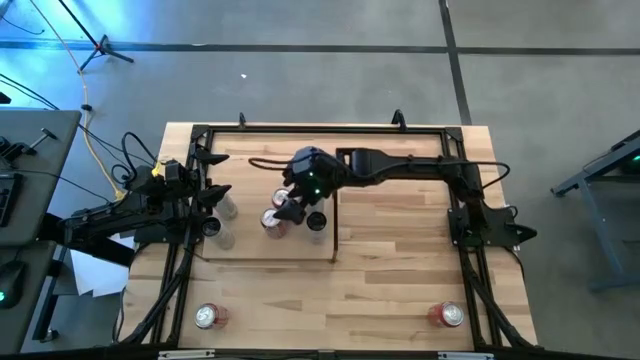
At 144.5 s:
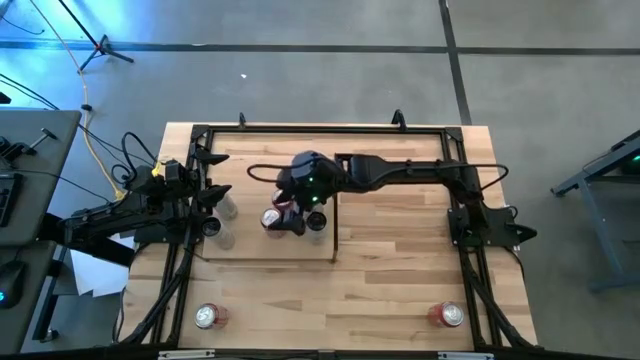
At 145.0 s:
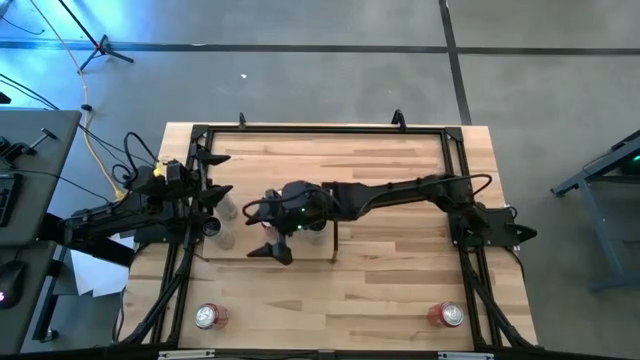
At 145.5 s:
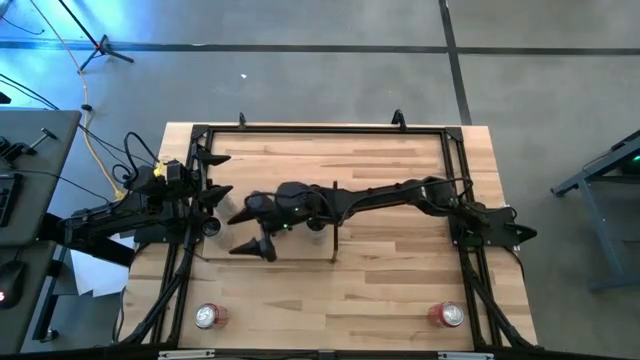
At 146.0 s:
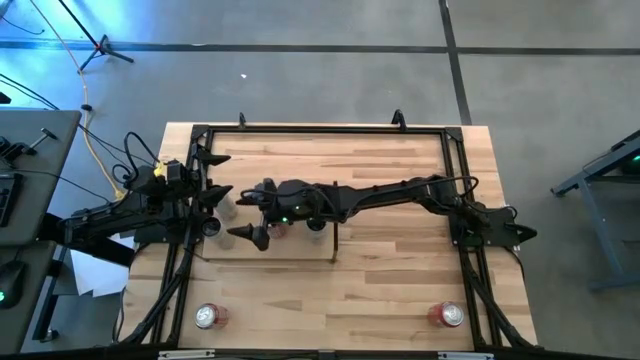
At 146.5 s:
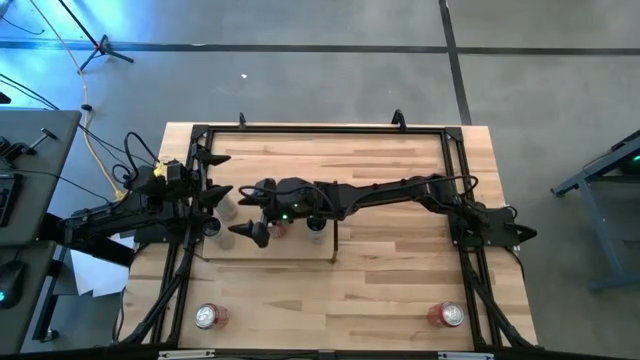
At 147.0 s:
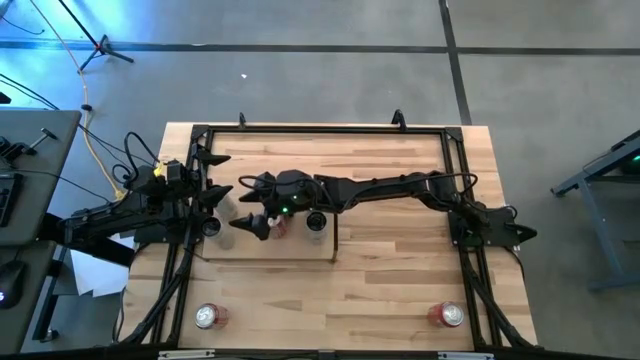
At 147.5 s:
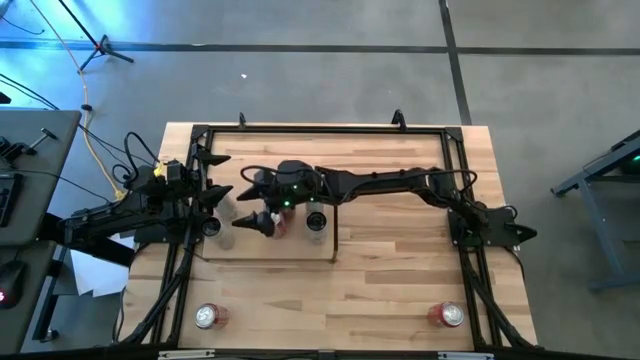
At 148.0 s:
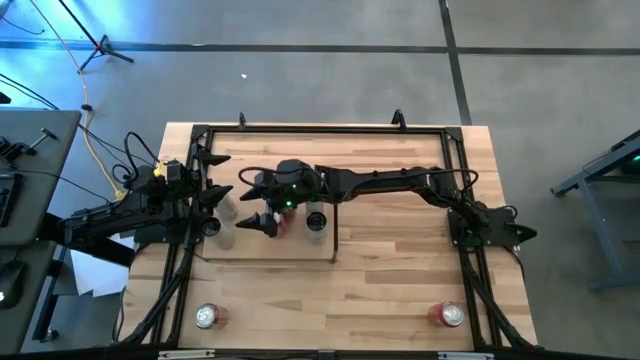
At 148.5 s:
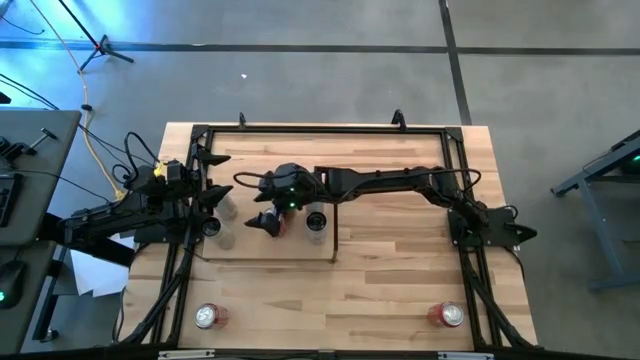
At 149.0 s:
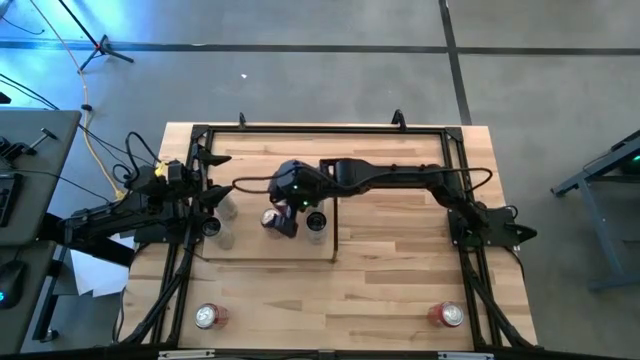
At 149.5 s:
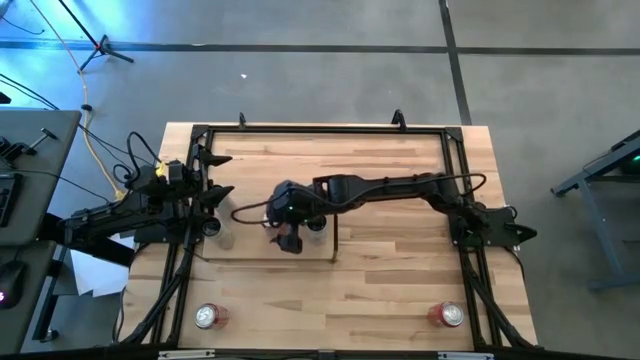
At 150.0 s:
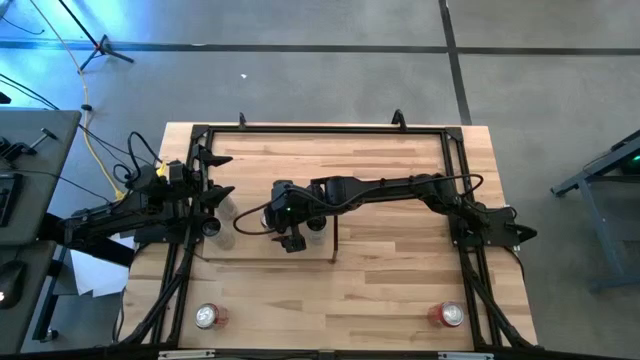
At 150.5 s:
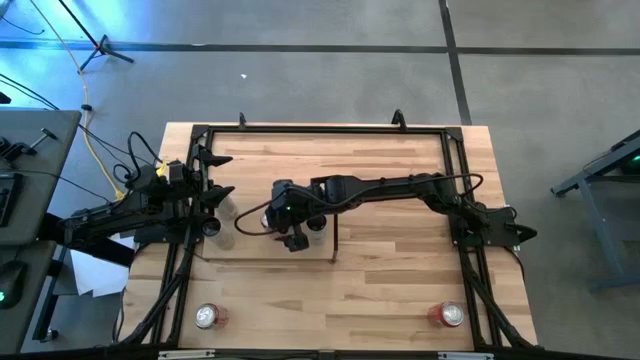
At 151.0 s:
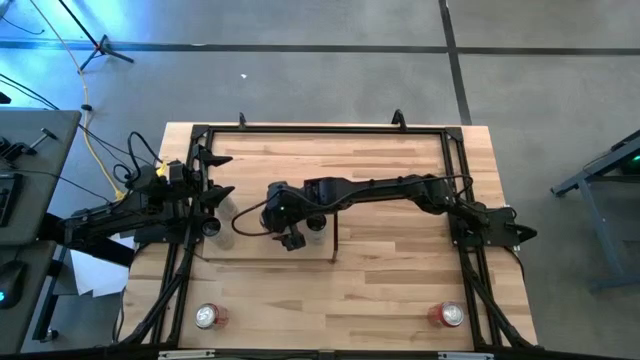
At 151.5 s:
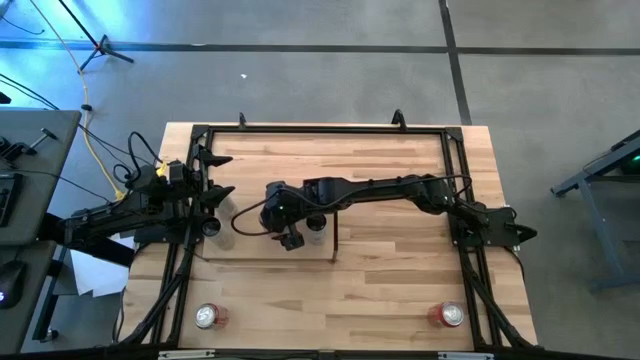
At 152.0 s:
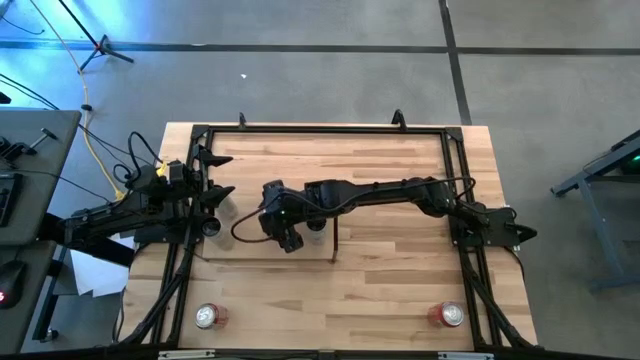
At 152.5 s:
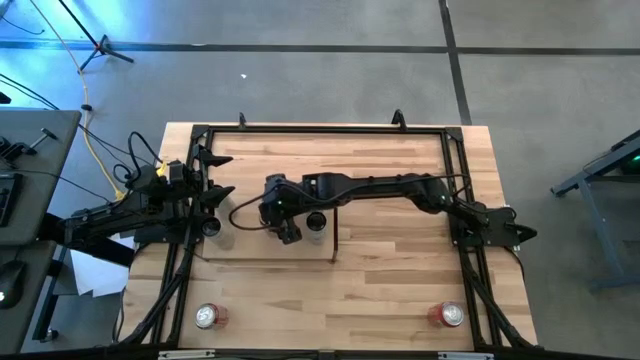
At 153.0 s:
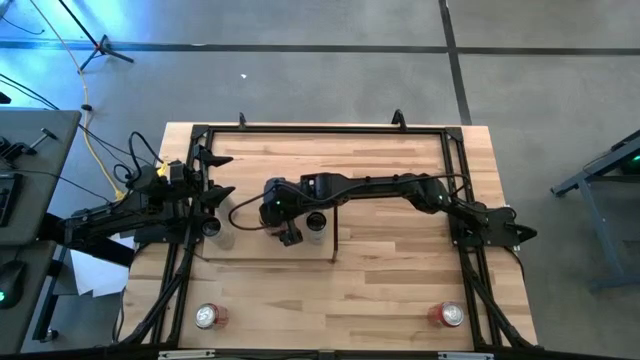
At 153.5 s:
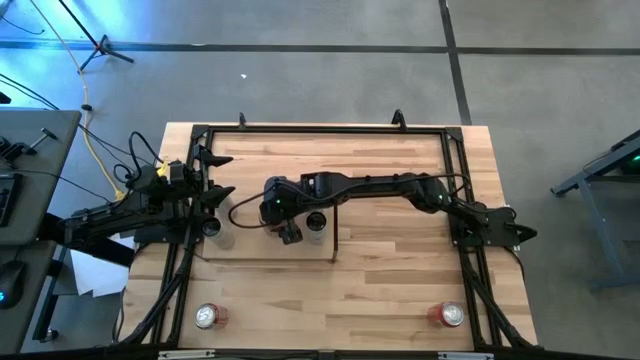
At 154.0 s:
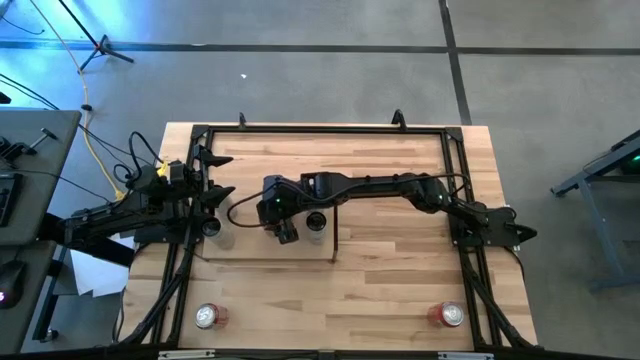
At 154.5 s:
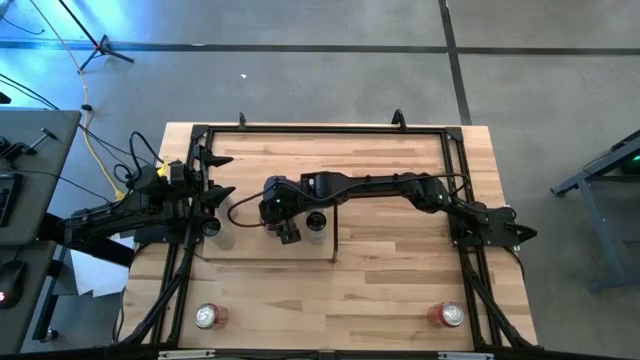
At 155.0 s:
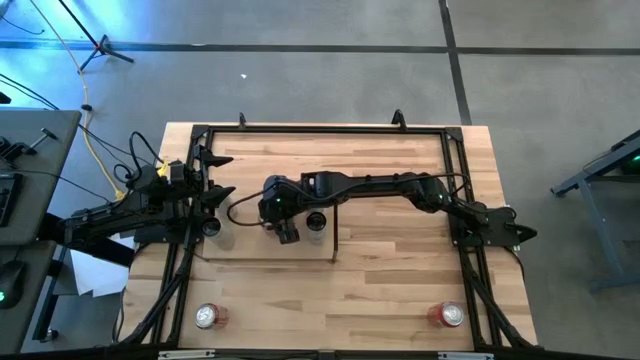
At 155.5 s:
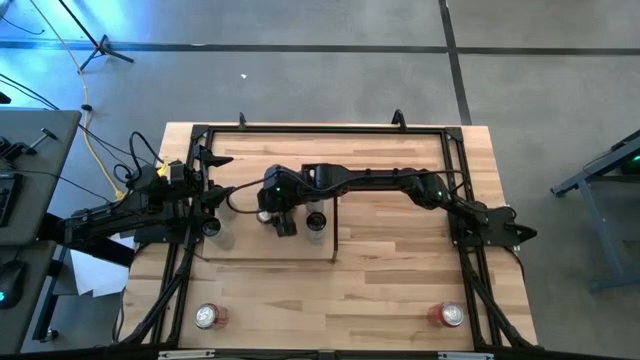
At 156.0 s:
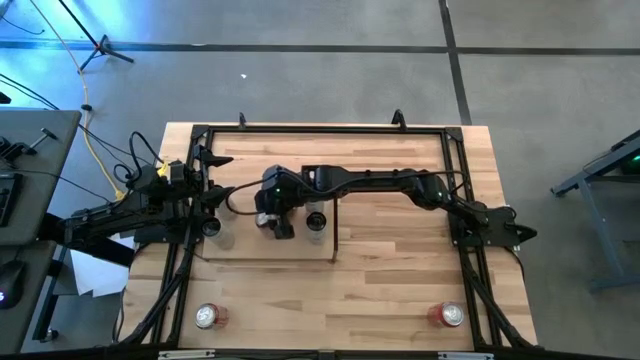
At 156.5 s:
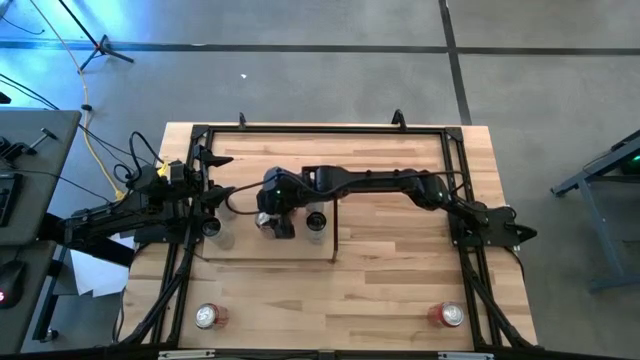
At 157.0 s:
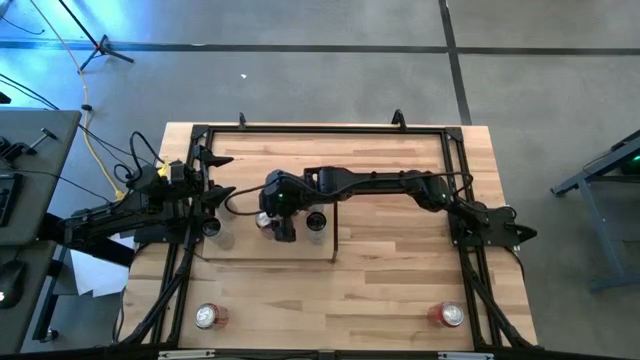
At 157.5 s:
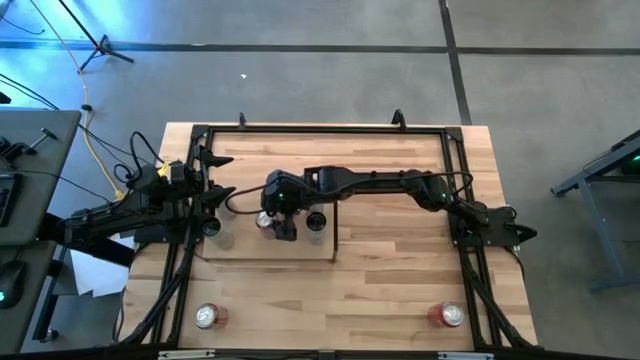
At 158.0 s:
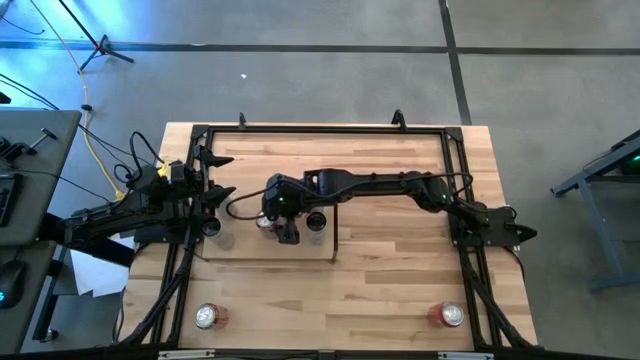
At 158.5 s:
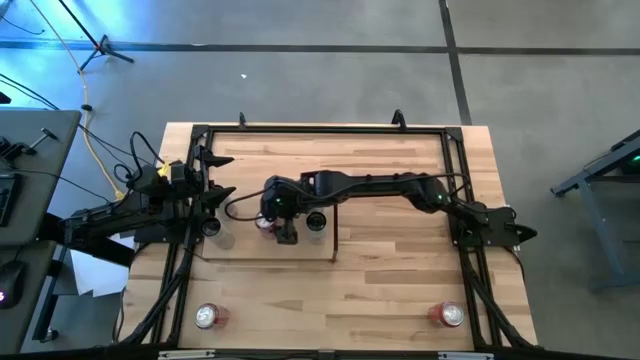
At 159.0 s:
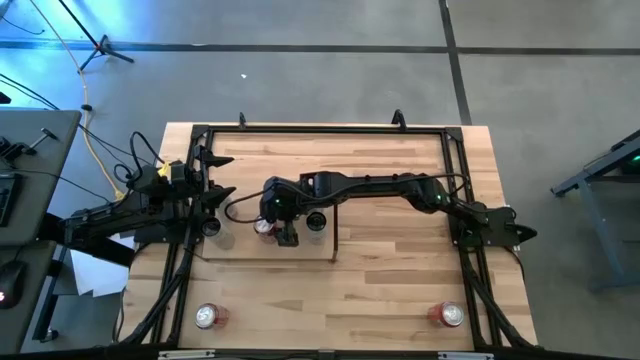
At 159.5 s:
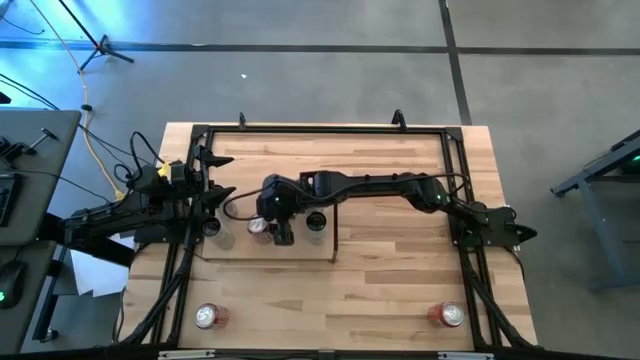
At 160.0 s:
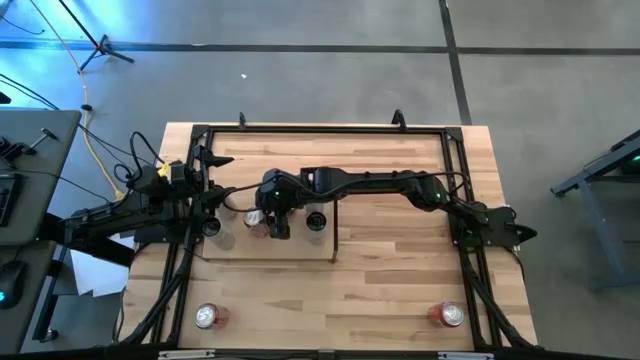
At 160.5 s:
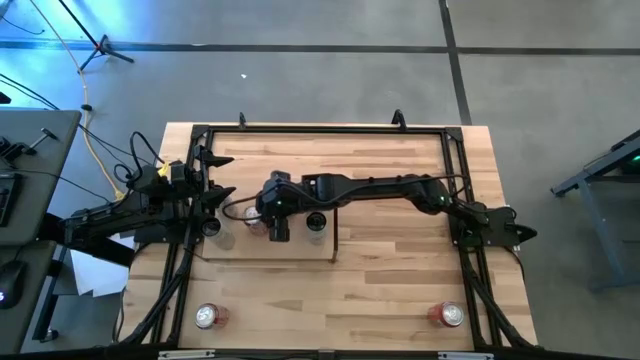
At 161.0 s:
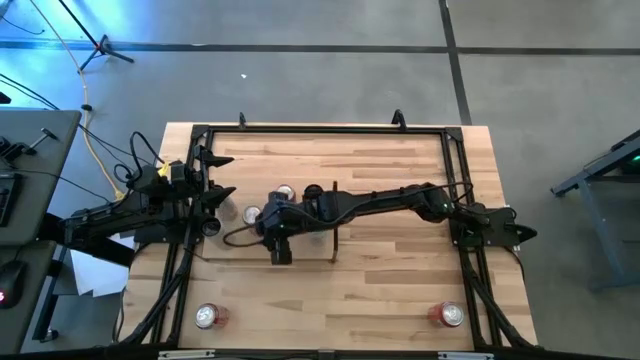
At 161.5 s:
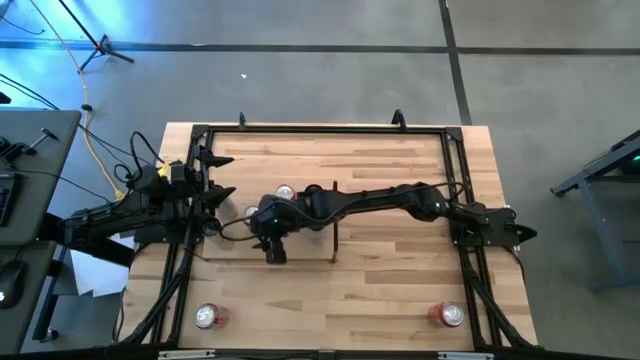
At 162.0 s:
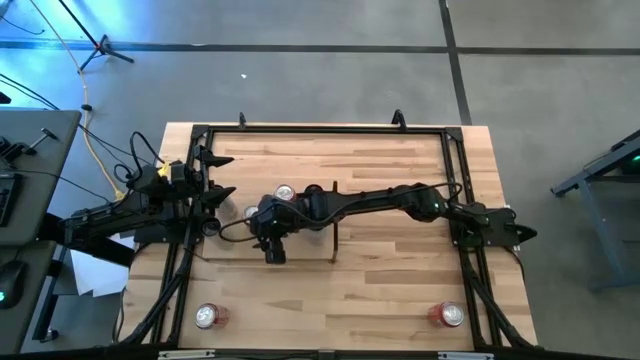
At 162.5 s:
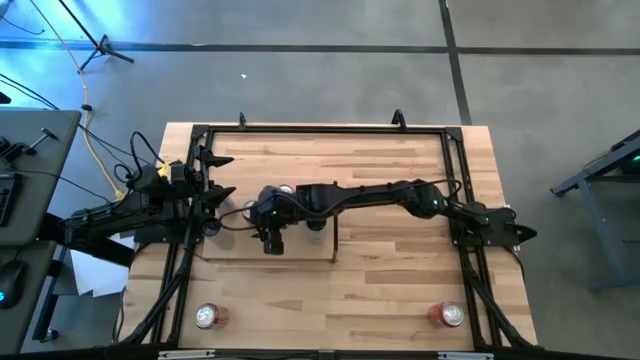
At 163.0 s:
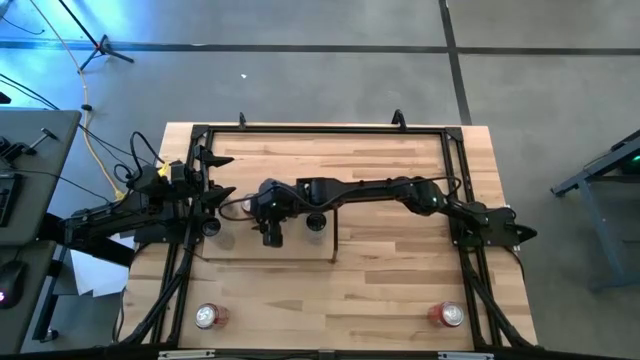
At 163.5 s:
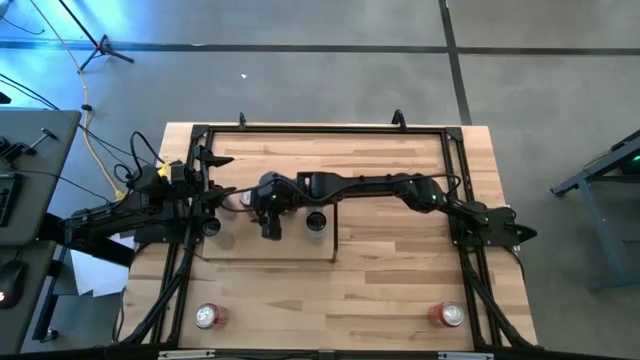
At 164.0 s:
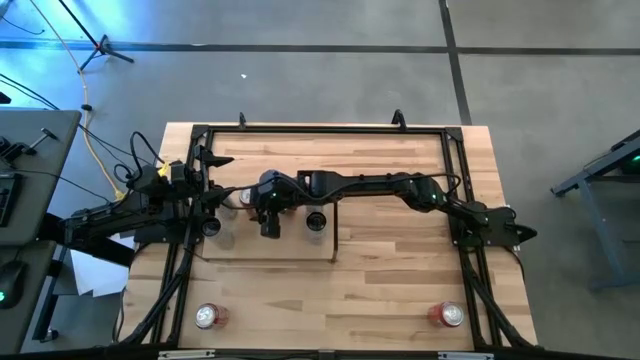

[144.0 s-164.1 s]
Task: Place canned beverage on shelf
Put the right red white soda can on the shelf
